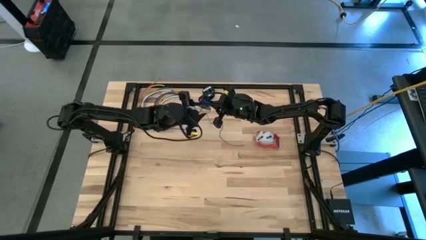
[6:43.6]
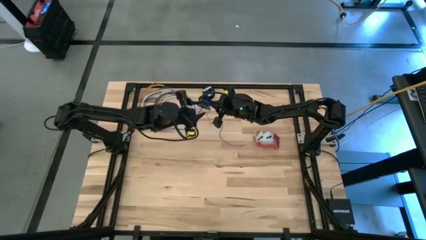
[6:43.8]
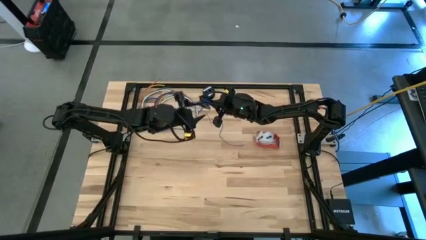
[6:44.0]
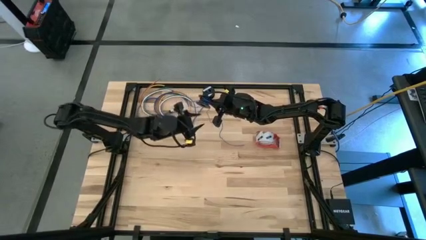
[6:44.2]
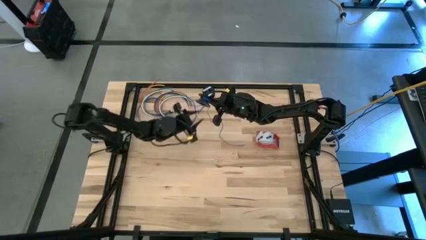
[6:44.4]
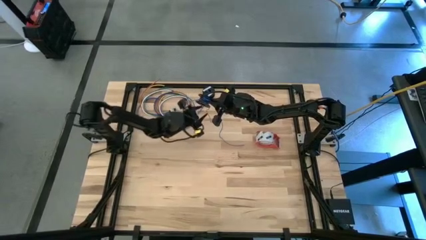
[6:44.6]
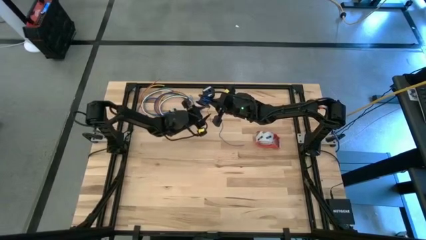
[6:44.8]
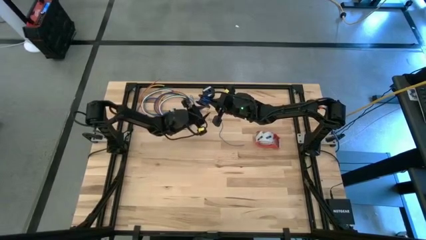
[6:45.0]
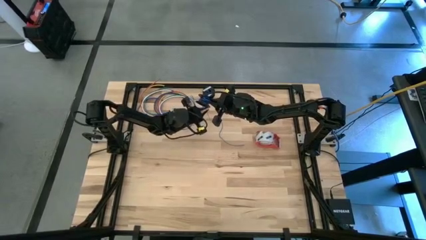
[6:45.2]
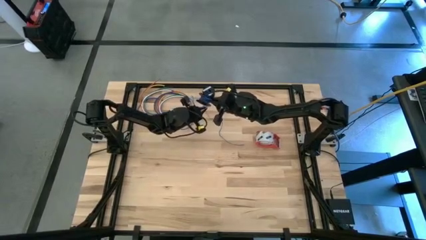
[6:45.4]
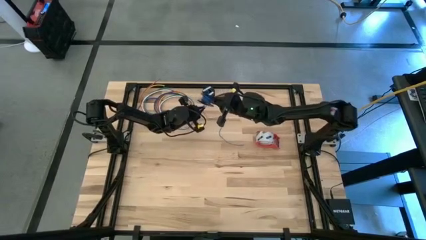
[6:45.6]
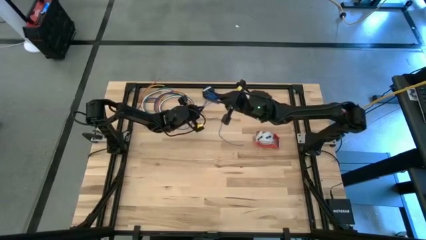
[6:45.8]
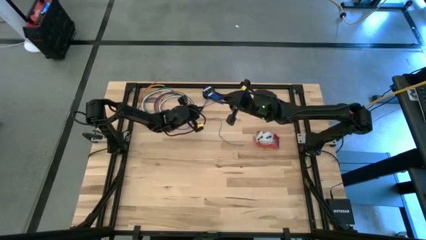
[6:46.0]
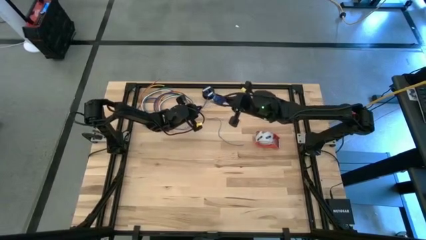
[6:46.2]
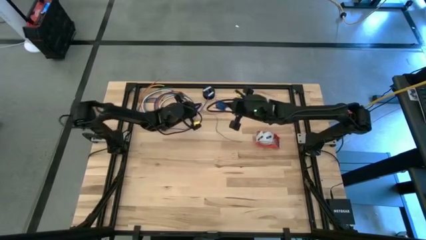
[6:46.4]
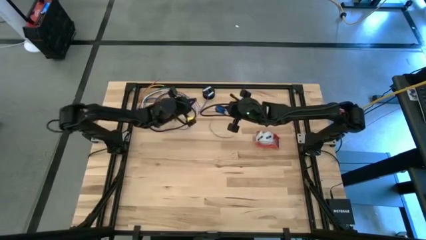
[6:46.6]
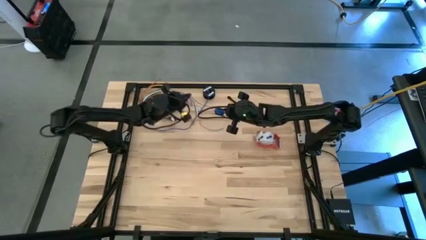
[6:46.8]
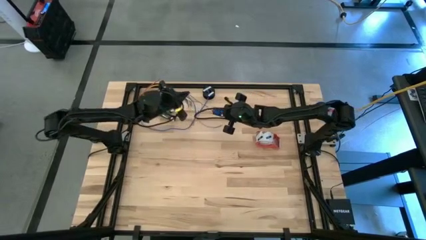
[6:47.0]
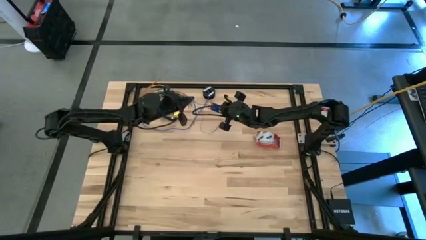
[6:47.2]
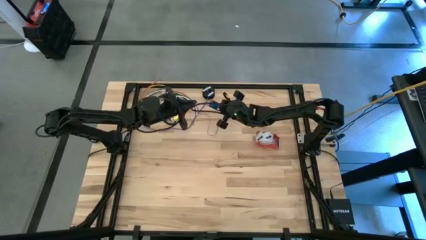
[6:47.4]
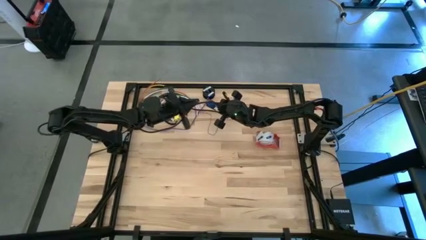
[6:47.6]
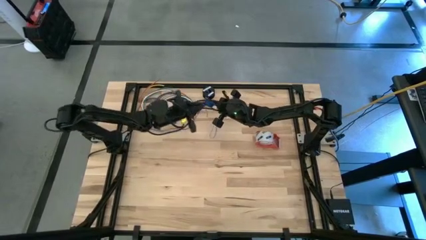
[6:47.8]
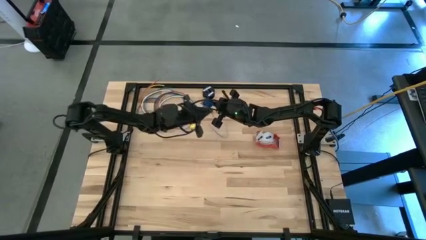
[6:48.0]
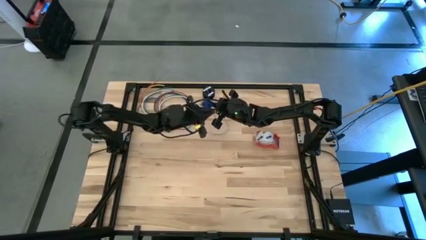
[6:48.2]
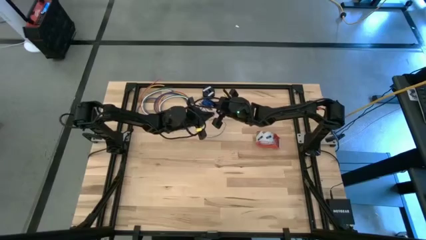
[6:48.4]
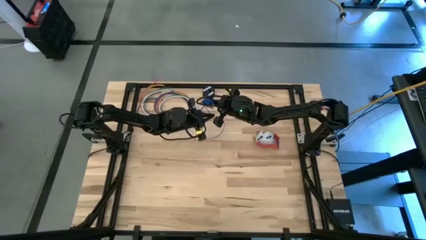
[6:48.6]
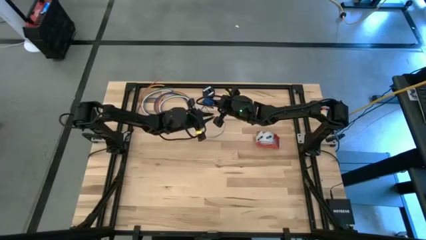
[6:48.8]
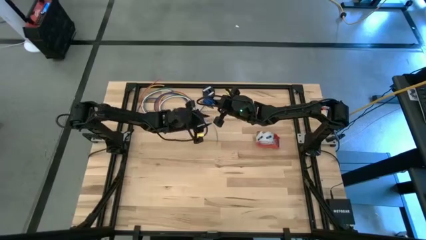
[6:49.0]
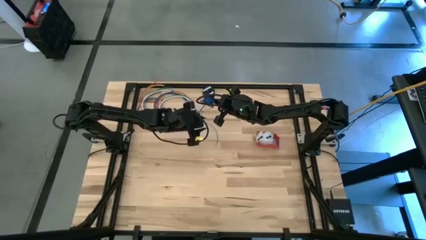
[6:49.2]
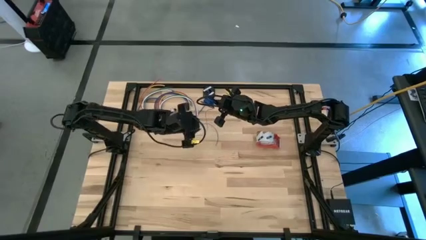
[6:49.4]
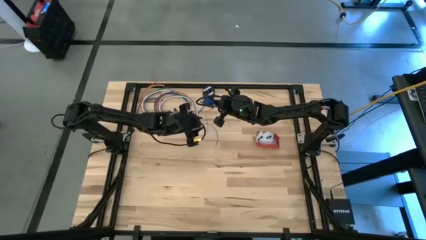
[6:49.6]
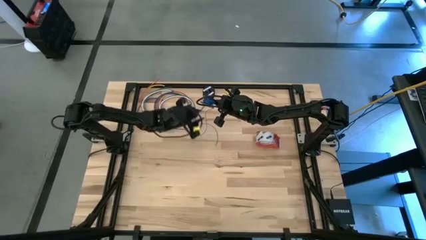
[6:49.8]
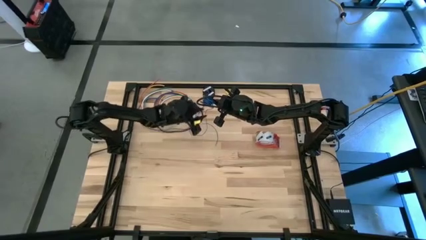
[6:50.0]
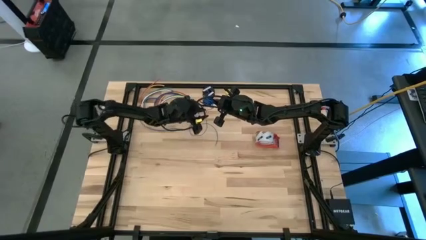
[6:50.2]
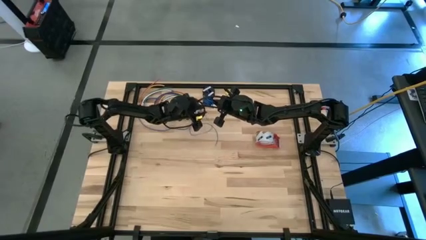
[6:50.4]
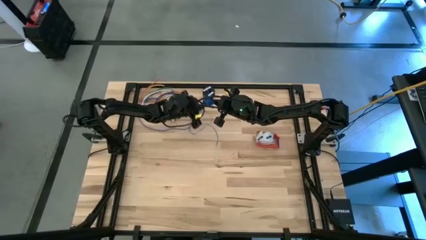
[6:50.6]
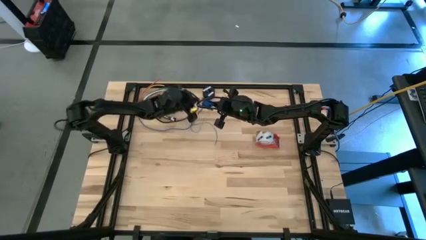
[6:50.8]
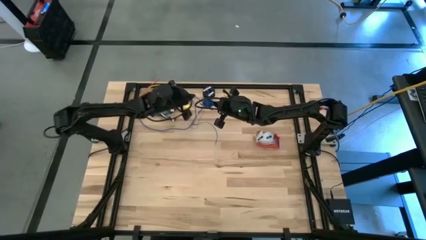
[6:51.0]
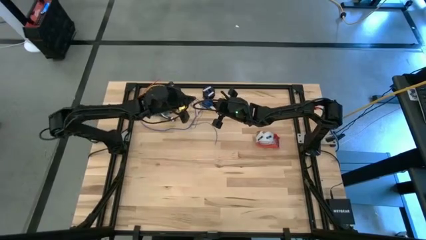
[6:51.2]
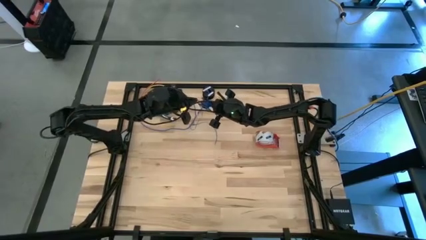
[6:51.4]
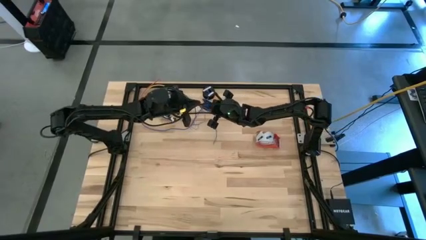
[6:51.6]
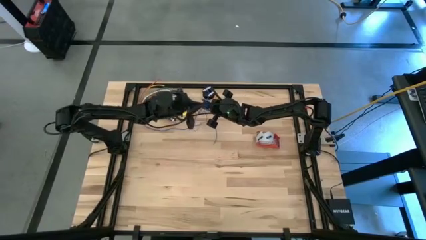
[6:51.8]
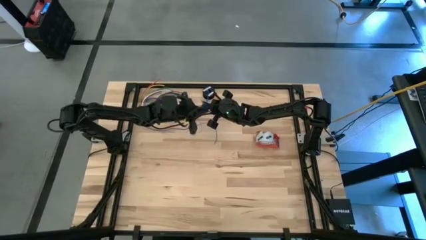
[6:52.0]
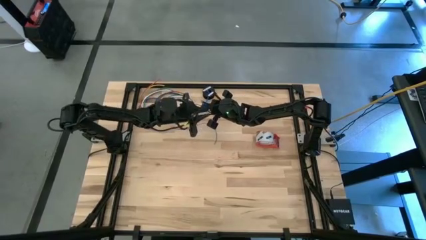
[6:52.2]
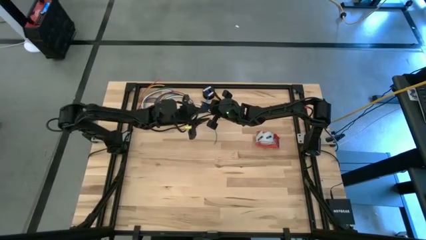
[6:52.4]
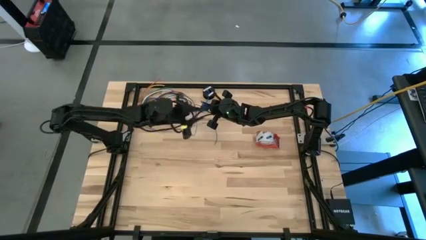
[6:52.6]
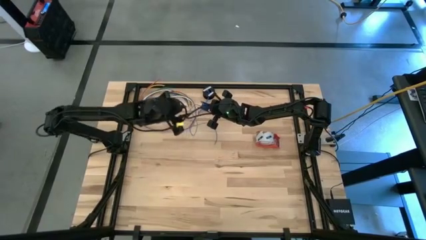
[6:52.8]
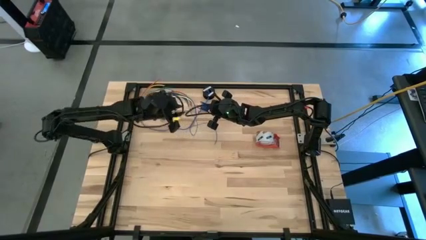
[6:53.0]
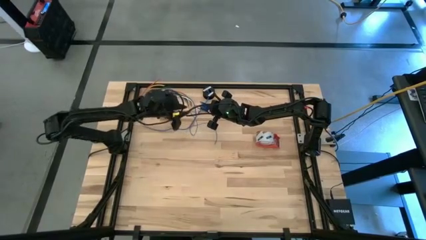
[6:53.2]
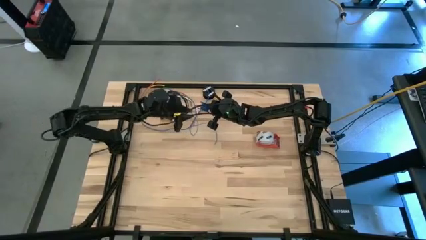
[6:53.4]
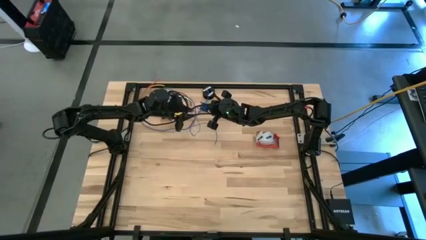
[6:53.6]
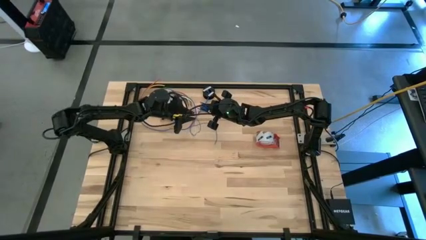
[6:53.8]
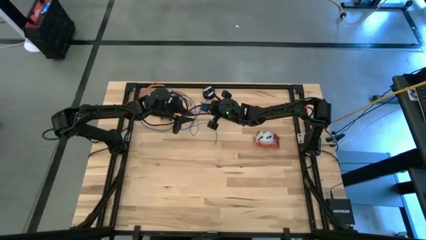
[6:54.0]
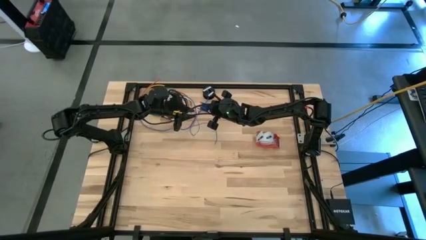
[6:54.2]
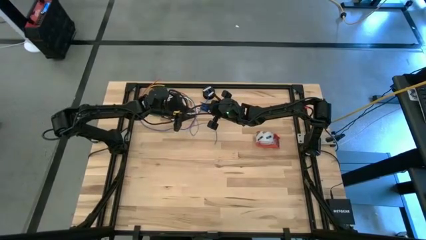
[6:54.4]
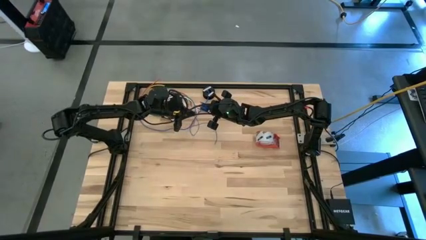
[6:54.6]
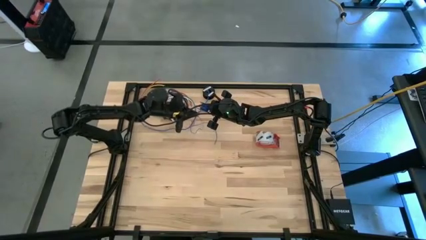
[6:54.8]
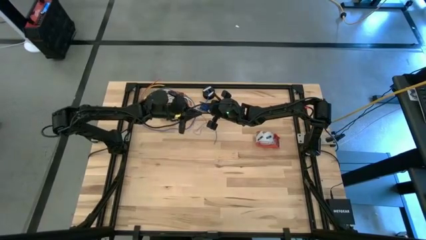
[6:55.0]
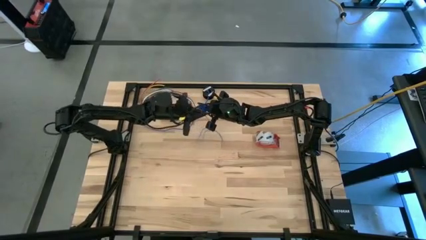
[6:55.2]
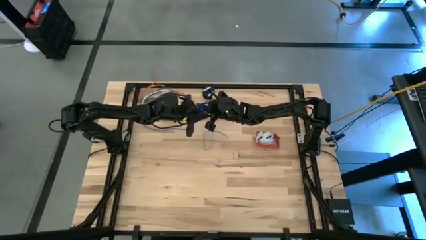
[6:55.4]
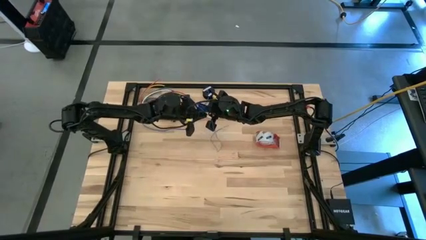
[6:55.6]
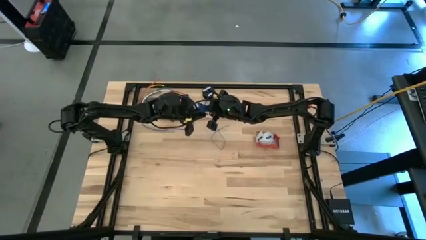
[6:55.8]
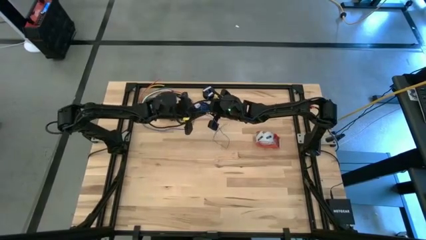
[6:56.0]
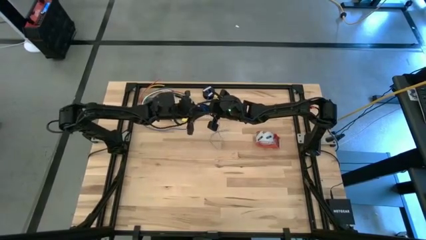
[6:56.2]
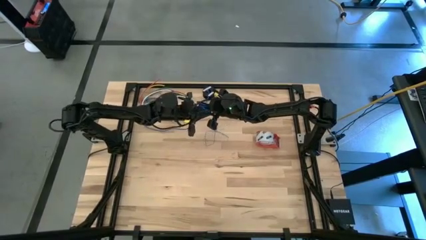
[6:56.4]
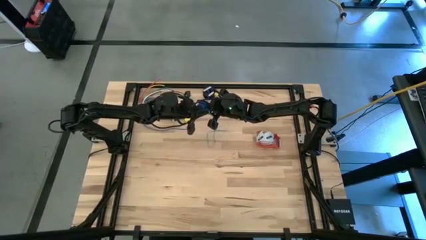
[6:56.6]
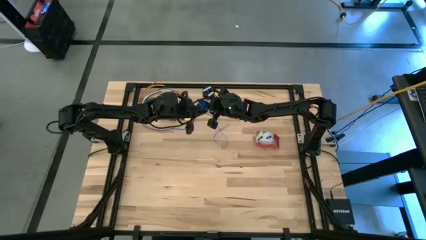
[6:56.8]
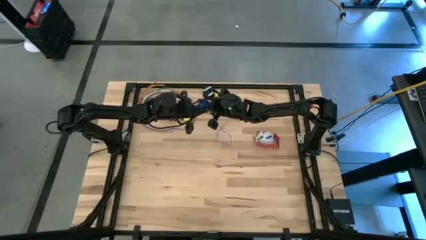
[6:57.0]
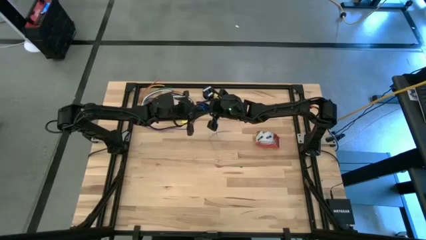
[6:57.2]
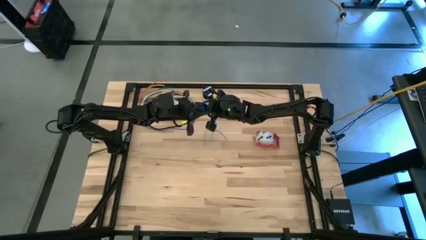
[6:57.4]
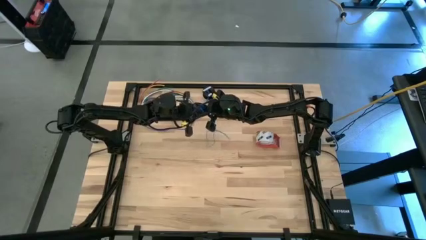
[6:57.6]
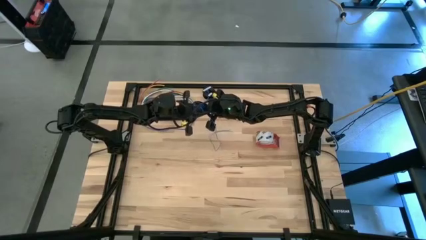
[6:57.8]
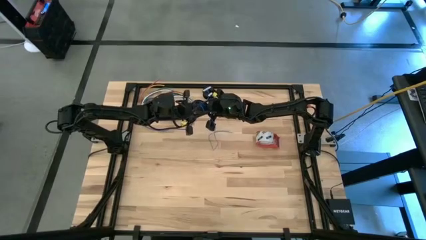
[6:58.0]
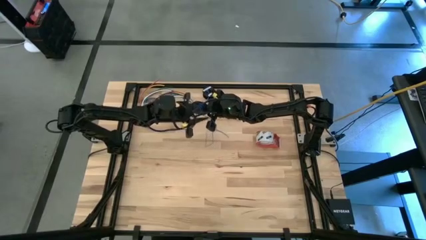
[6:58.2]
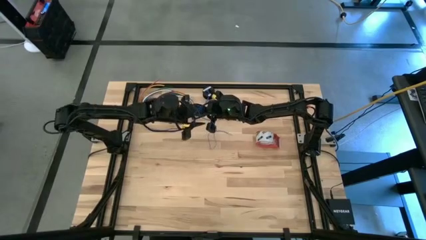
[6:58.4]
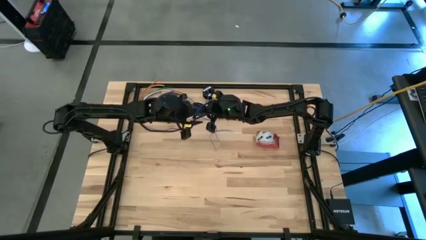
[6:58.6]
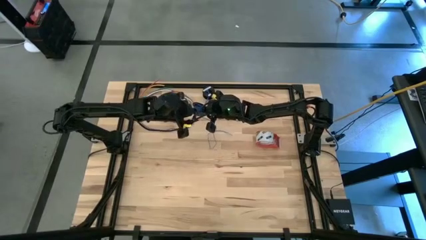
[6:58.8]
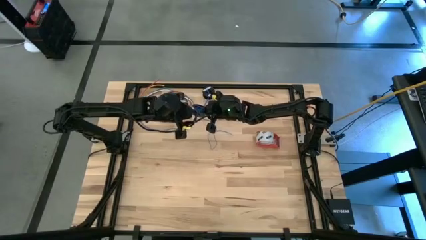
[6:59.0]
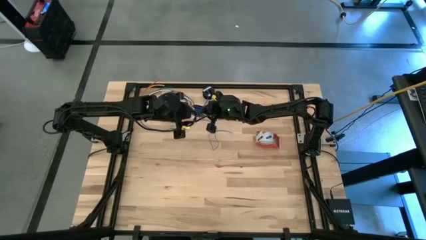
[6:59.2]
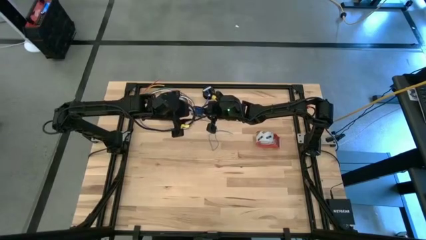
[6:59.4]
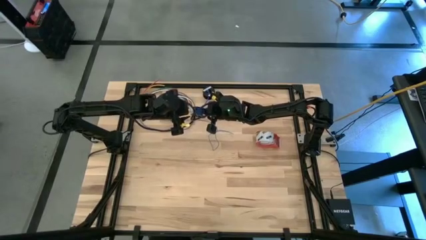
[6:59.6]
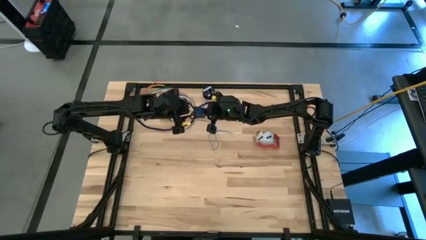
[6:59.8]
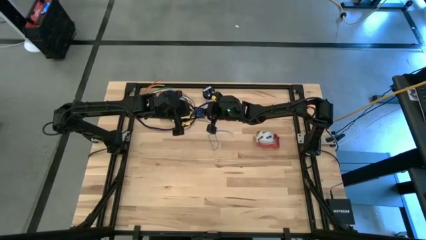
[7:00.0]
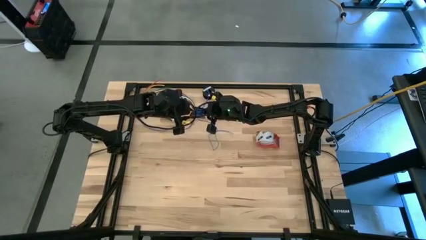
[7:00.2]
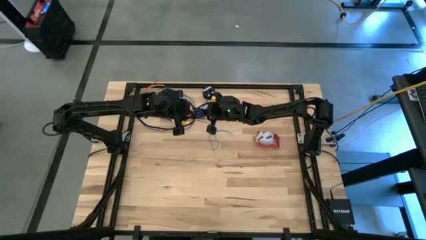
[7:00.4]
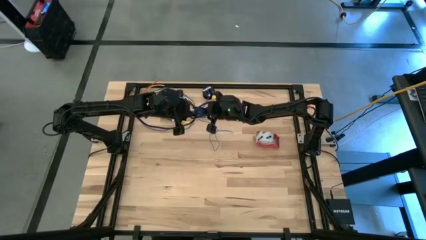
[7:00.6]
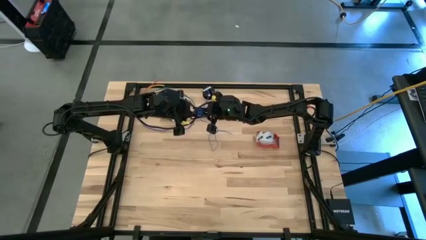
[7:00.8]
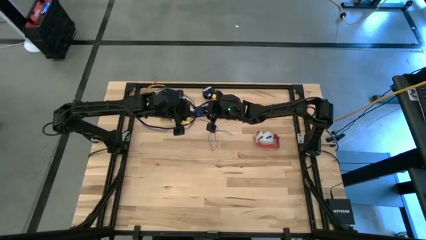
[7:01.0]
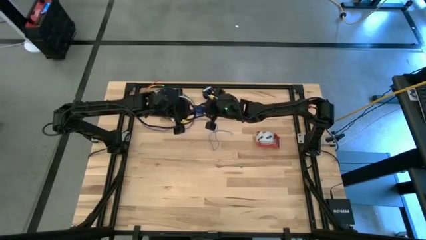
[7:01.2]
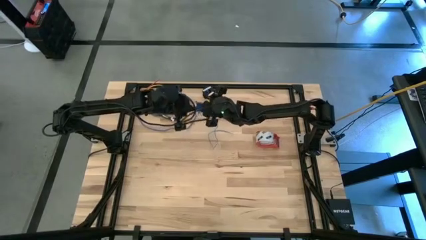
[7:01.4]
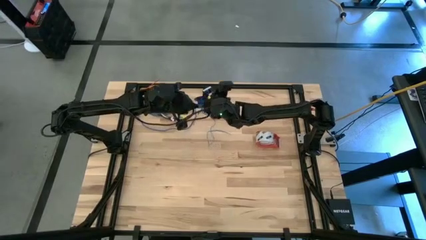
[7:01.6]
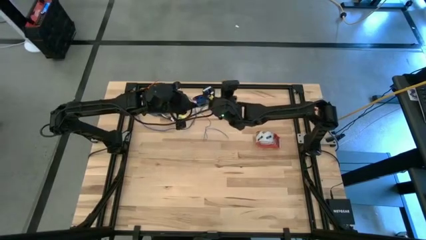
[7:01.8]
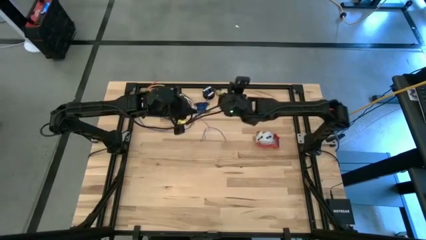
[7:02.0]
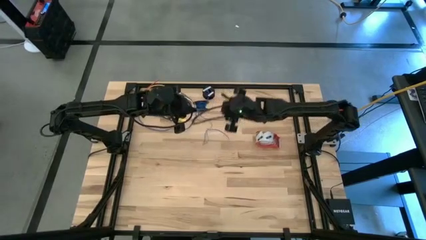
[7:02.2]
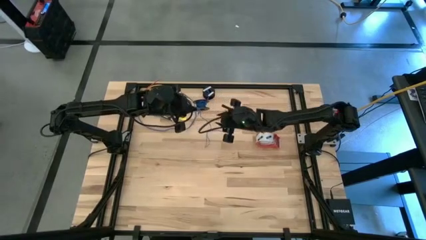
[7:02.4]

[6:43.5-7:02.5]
Task: Coil cords
Coil the blue wire onto the spool
